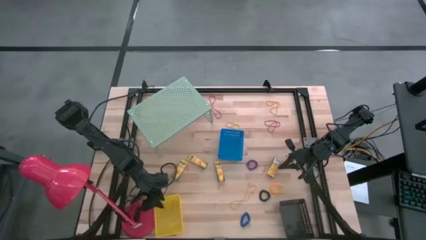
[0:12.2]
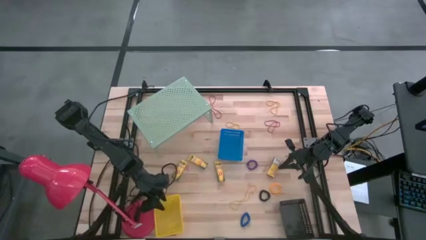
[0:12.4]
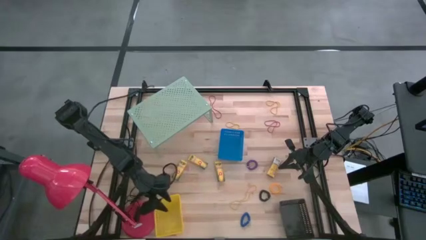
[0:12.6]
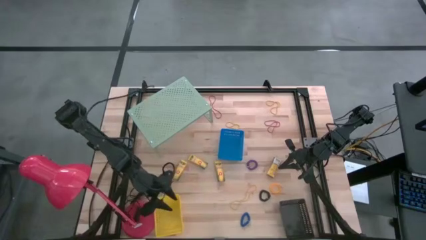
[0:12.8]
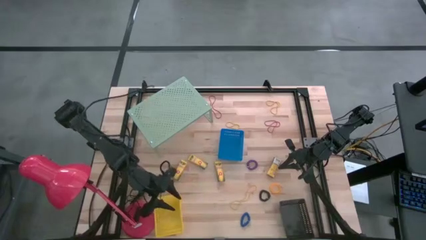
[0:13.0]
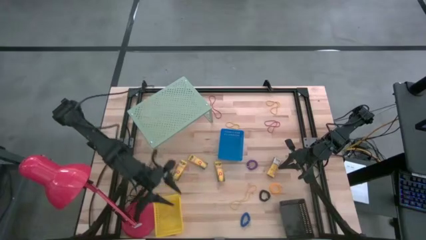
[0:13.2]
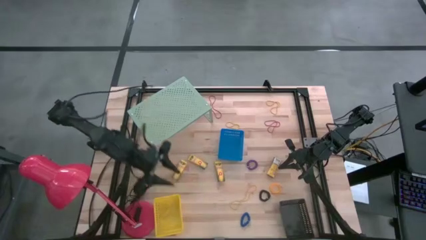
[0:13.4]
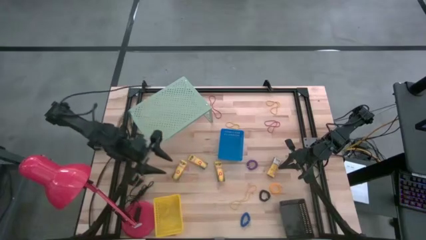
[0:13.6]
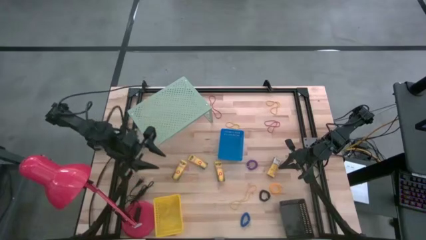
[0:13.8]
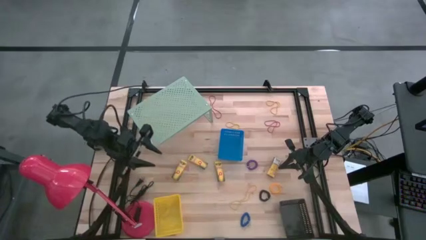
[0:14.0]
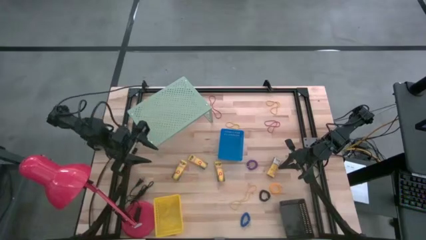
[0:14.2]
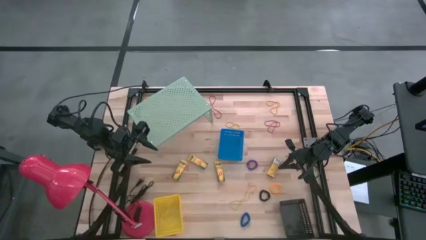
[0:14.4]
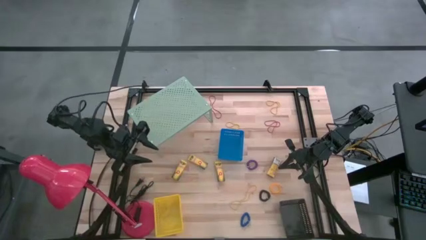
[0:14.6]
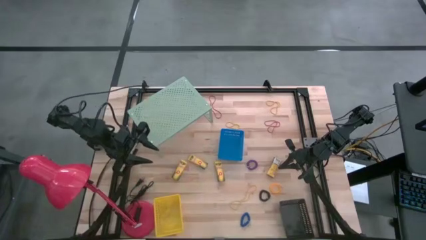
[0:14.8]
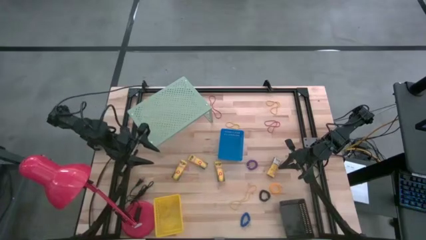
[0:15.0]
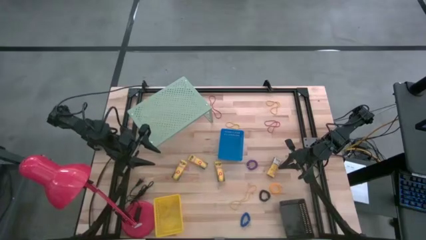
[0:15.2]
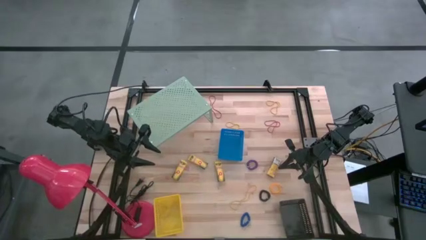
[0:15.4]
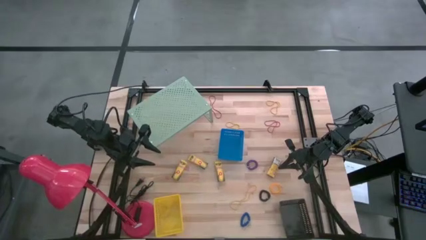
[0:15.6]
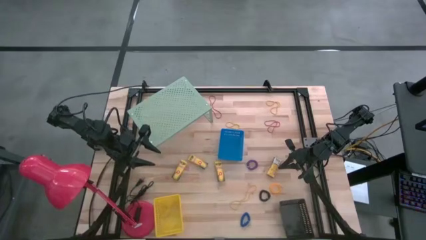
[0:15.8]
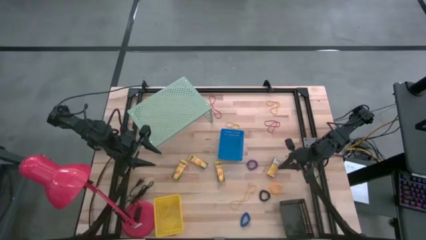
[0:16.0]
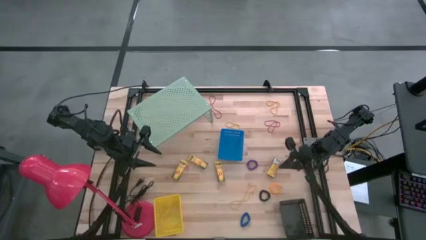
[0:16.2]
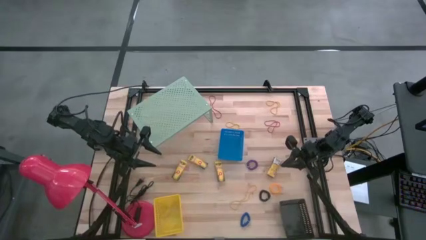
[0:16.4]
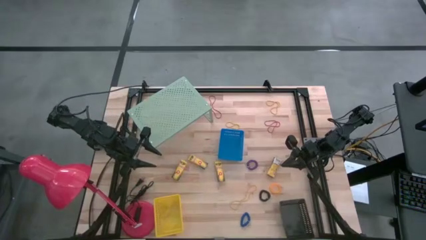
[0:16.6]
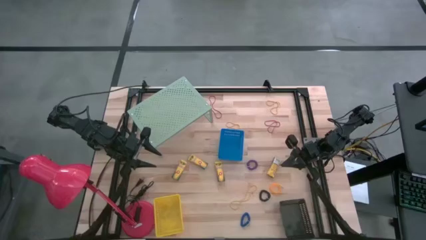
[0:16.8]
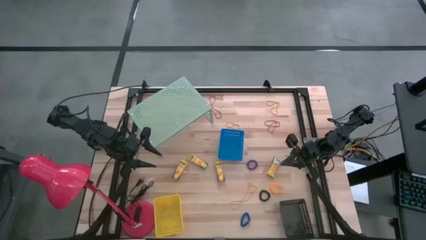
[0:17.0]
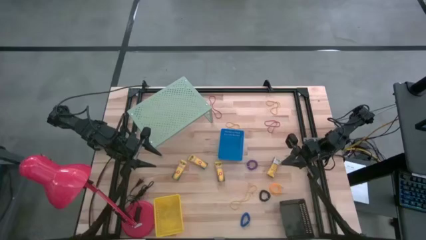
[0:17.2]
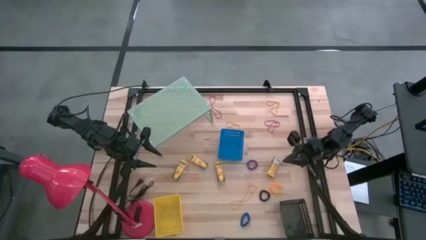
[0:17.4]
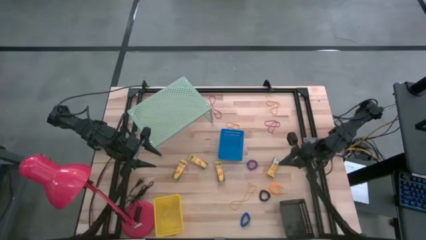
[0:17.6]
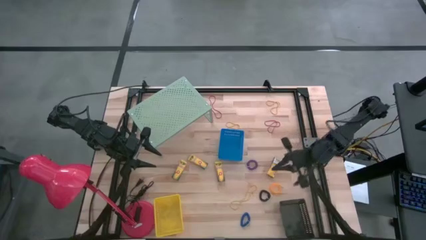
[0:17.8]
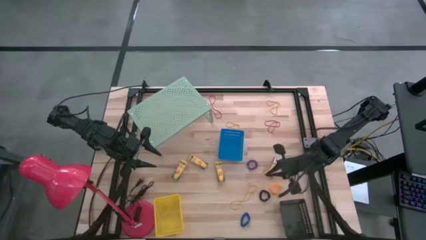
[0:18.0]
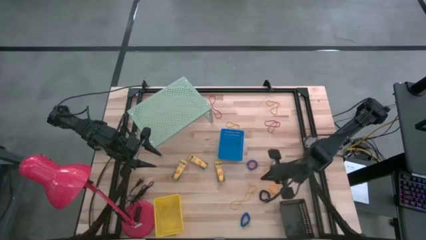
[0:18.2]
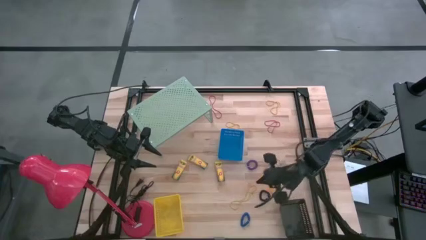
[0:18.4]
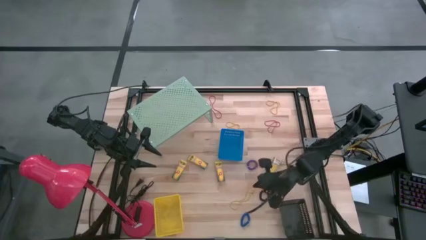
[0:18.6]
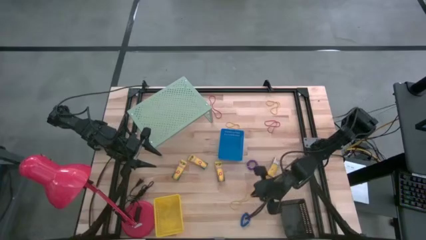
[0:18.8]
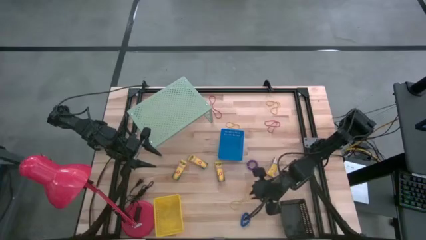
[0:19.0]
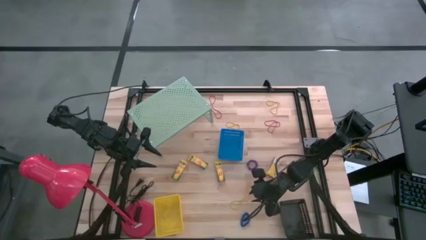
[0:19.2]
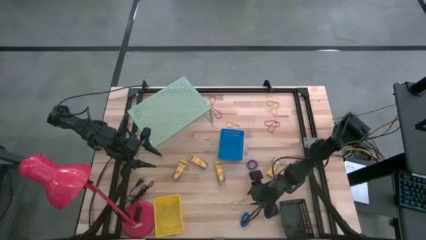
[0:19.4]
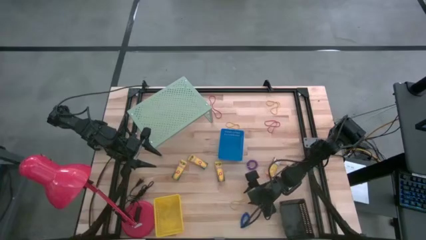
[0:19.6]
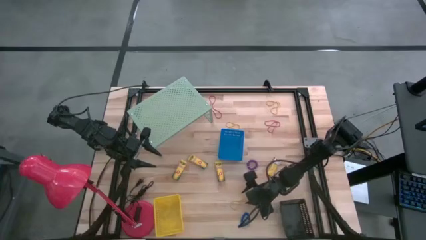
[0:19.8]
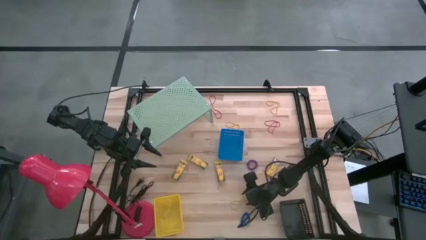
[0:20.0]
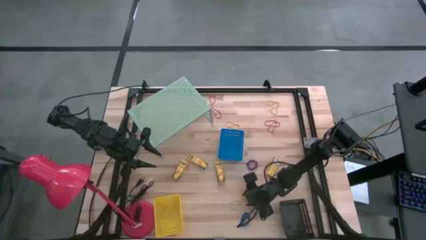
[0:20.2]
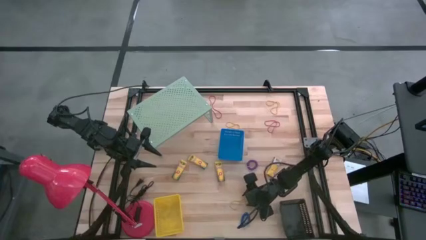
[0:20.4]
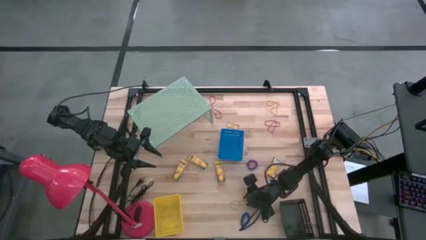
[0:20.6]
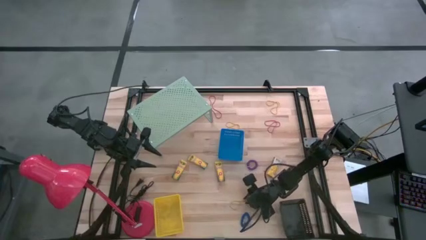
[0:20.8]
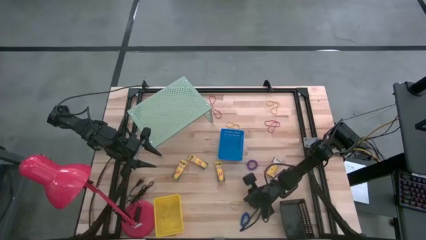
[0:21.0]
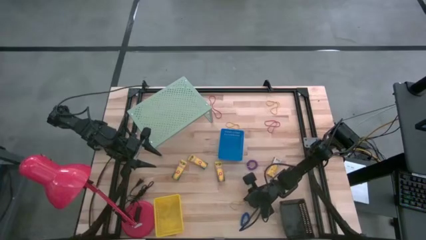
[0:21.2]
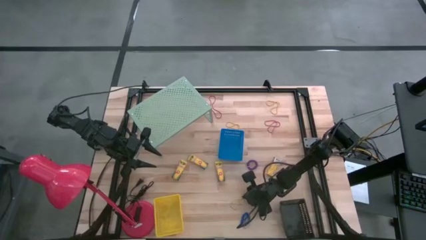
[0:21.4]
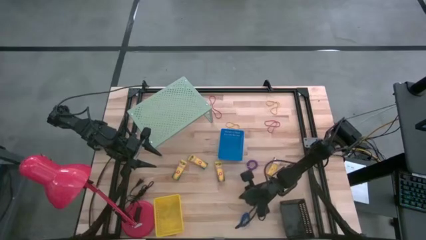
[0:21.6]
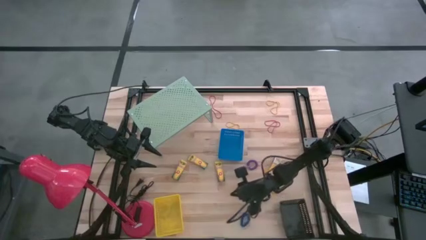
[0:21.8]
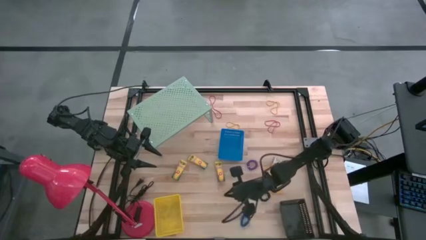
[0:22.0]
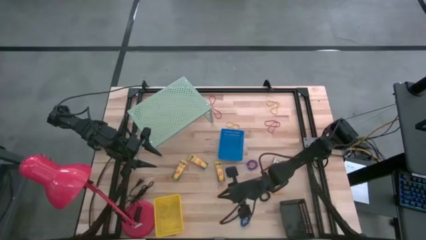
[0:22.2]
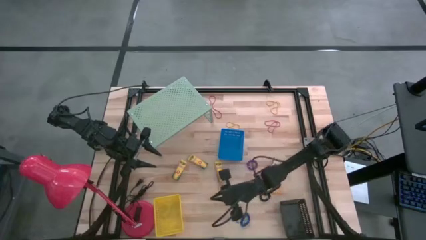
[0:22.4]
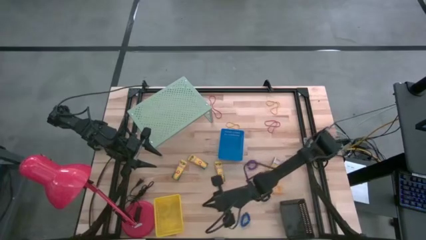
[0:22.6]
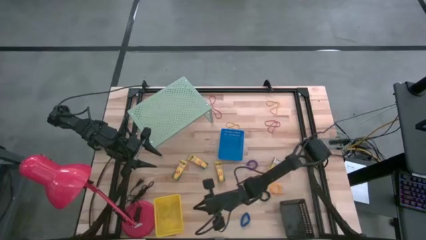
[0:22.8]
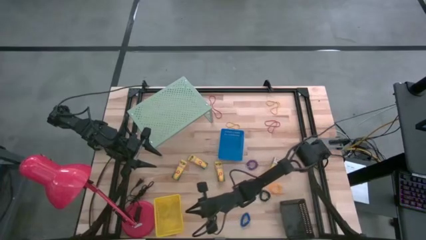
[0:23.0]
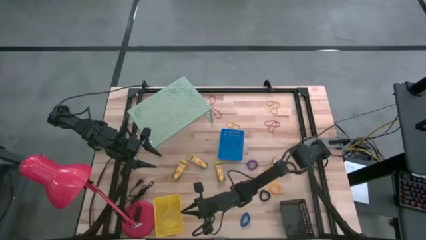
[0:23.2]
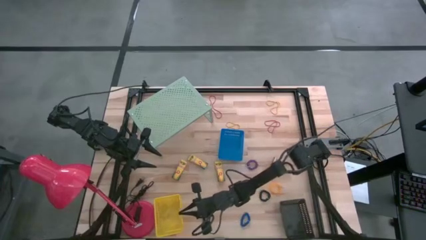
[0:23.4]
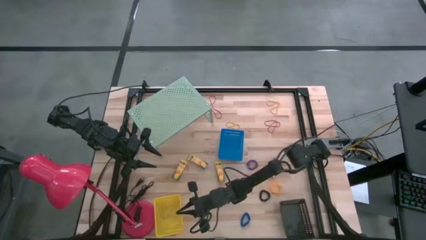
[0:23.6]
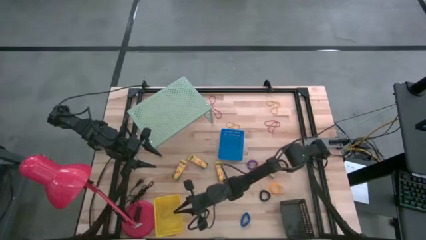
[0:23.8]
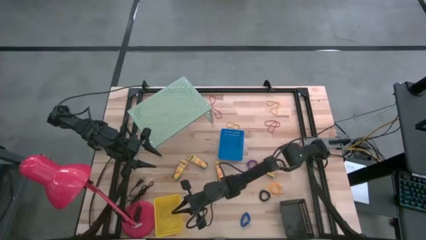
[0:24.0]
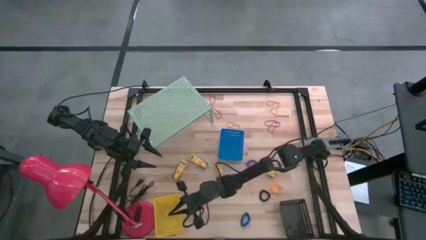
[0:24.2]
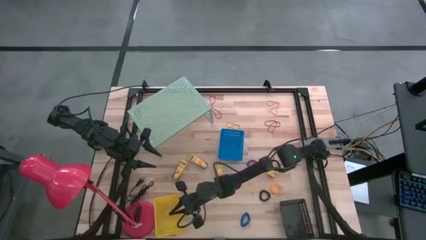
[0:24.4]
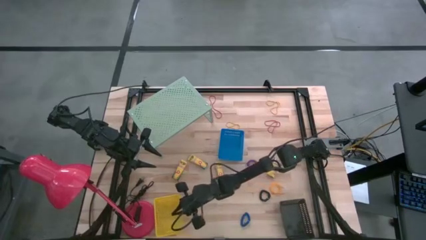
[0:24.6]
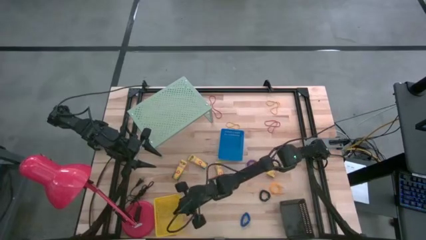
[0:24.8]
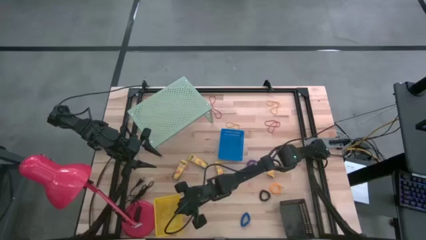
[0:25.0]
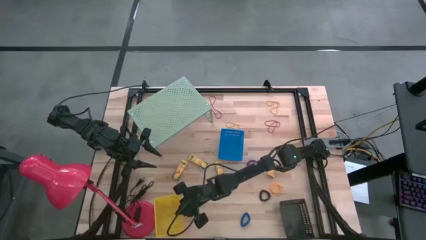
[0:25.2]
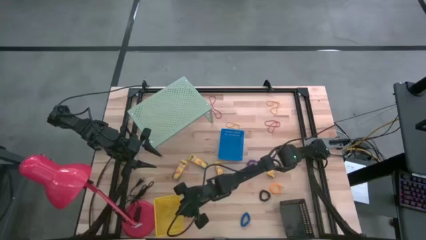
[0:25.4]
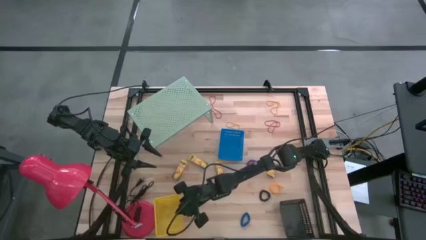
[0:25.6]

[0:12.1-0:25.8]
Task: Pick & Place Office Desk Supplies
Put the yellow rubber band into the yellow basket
